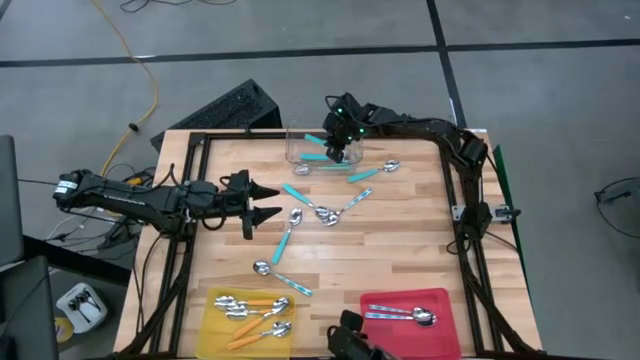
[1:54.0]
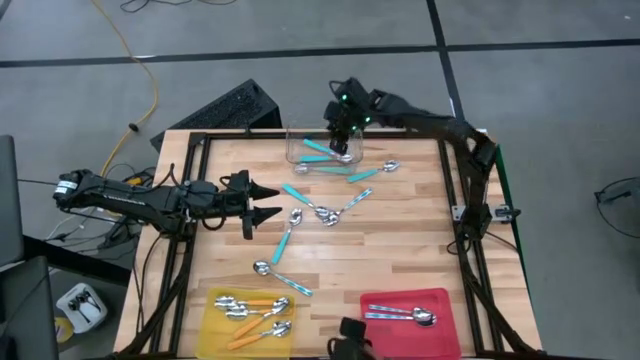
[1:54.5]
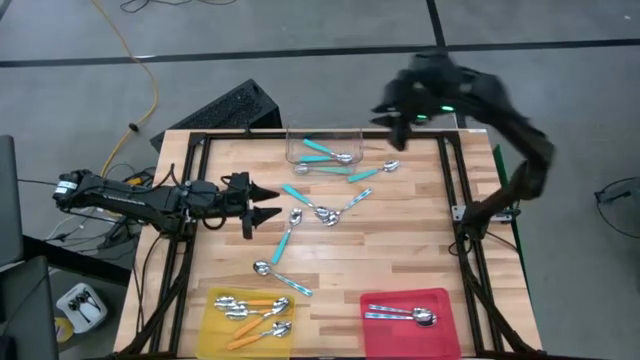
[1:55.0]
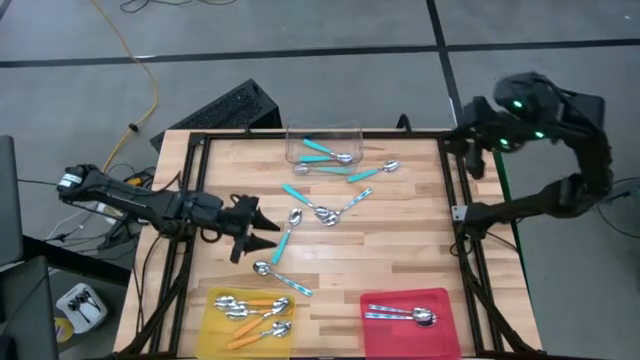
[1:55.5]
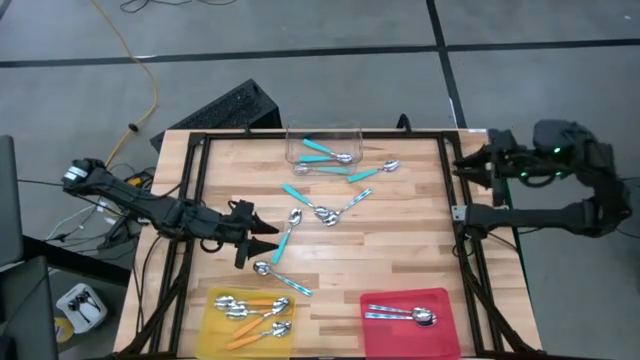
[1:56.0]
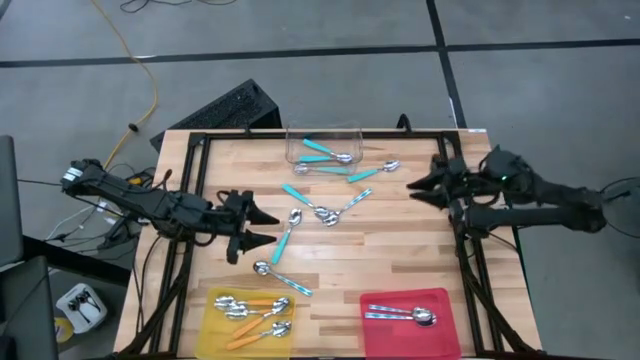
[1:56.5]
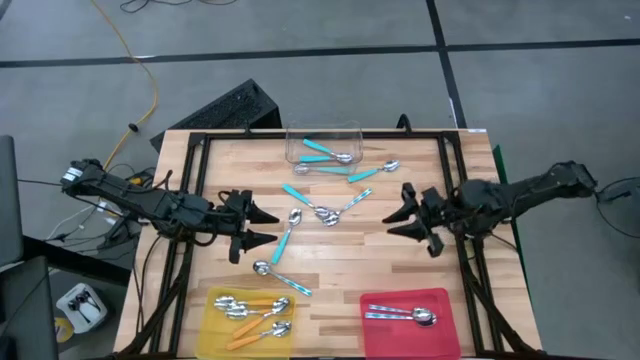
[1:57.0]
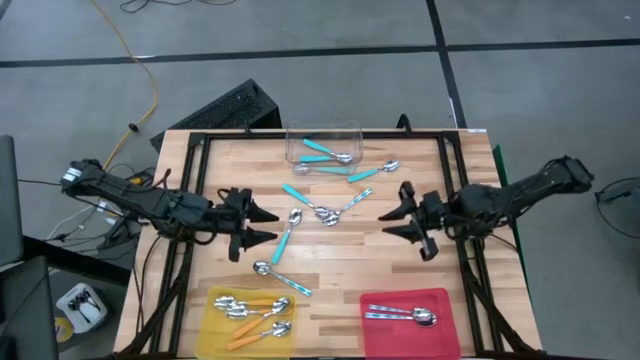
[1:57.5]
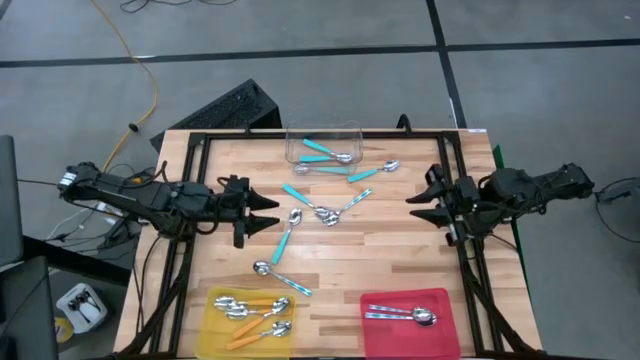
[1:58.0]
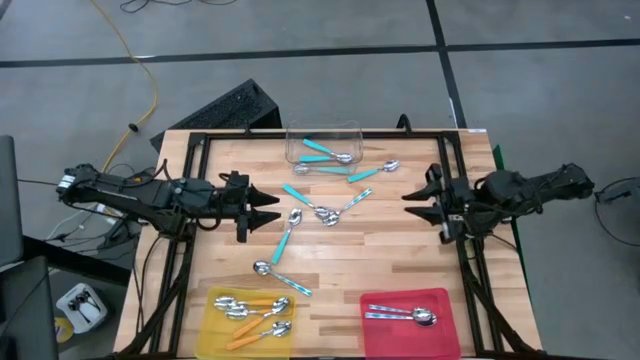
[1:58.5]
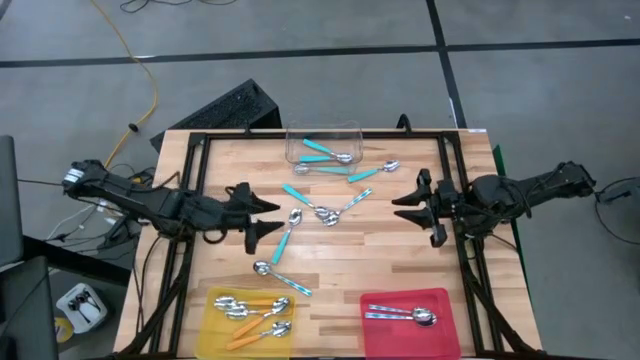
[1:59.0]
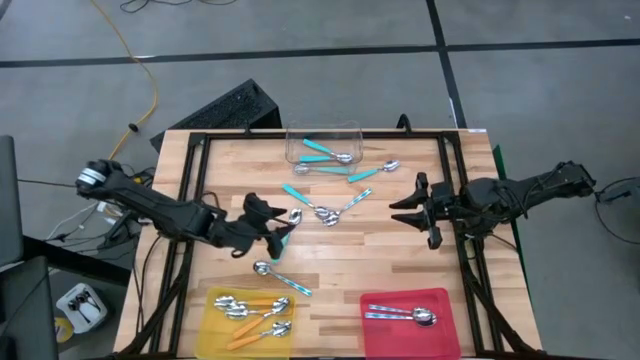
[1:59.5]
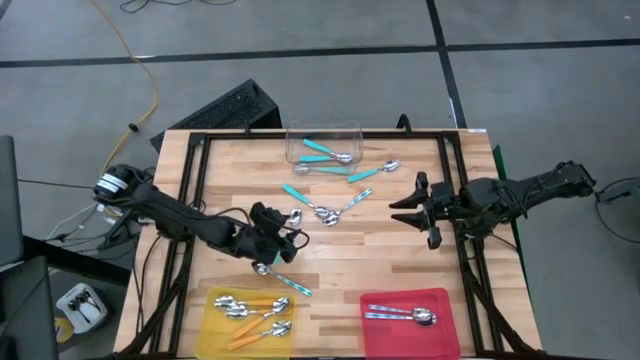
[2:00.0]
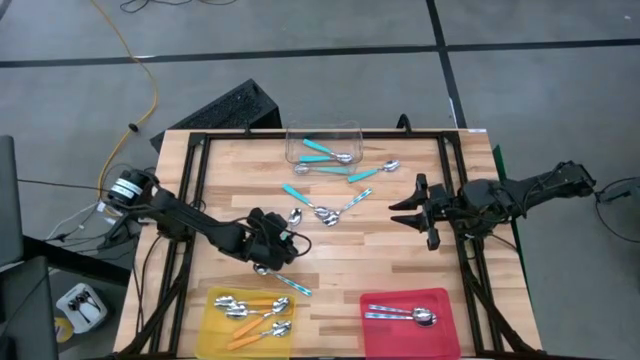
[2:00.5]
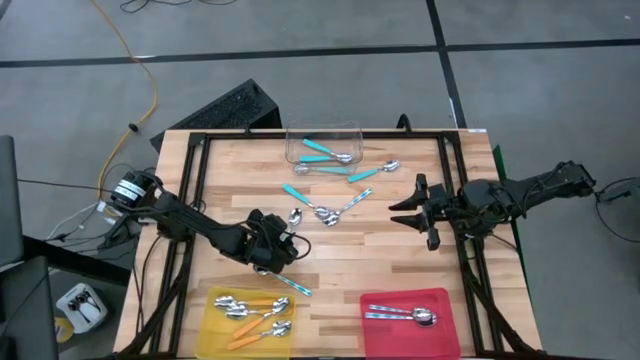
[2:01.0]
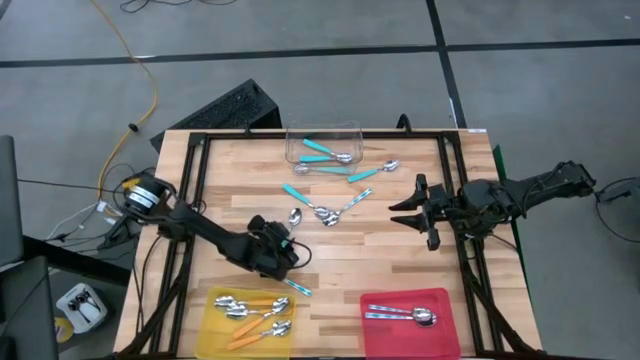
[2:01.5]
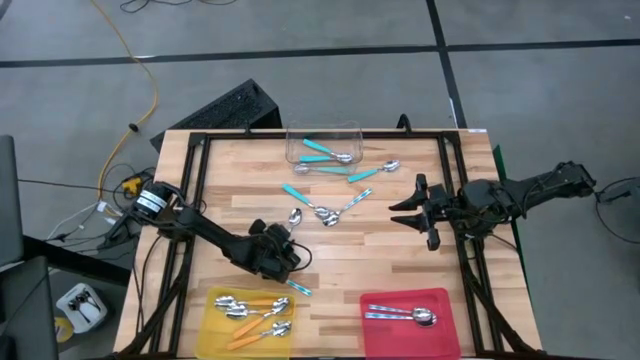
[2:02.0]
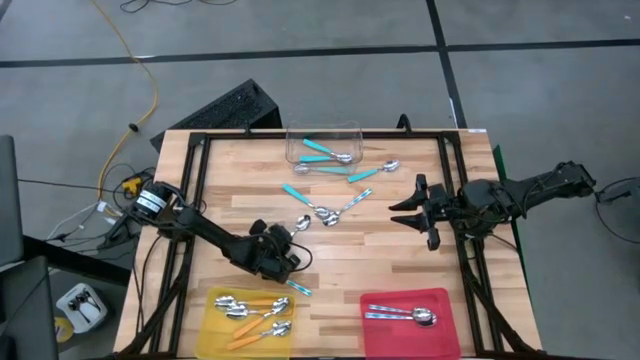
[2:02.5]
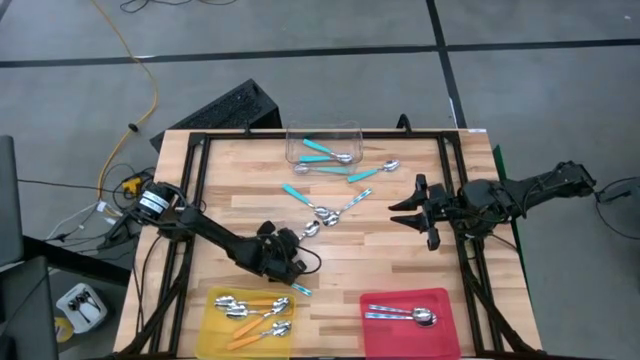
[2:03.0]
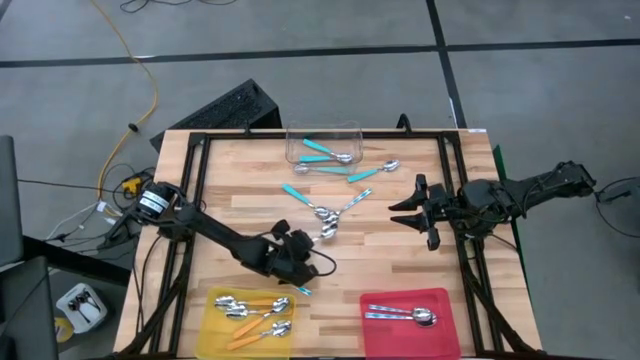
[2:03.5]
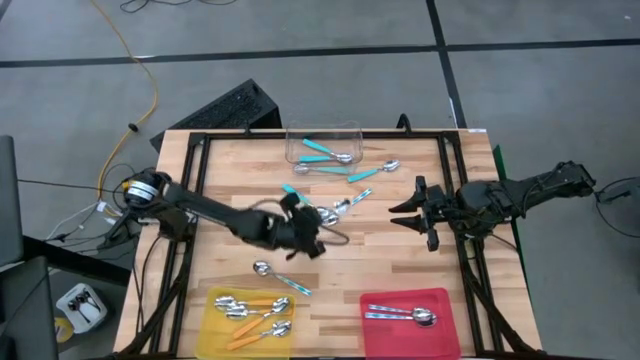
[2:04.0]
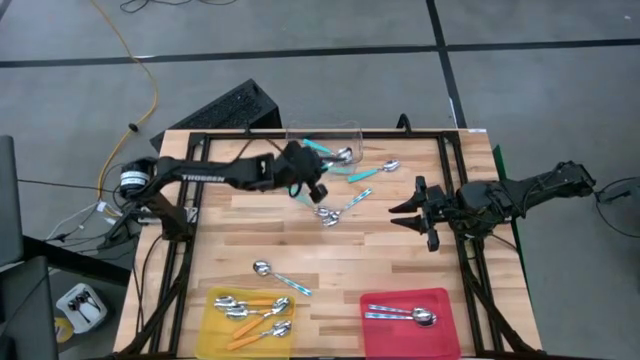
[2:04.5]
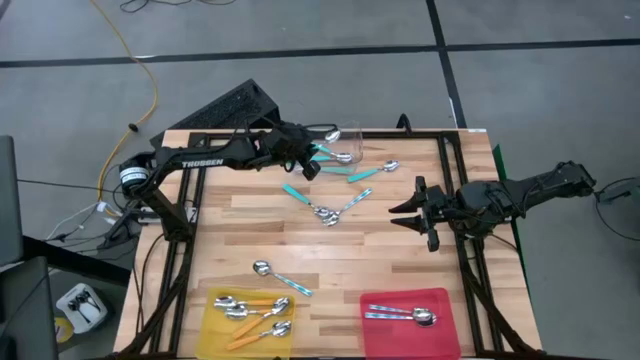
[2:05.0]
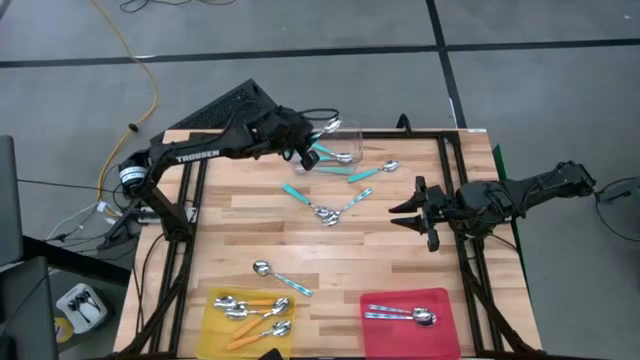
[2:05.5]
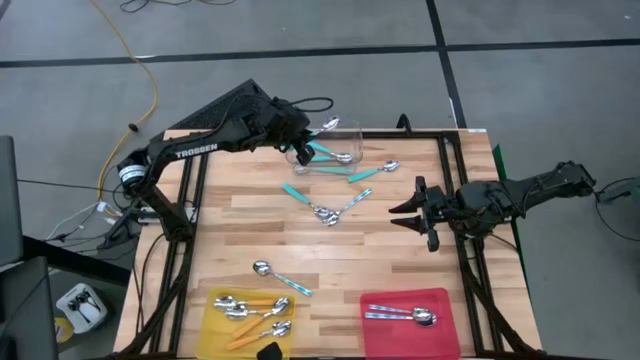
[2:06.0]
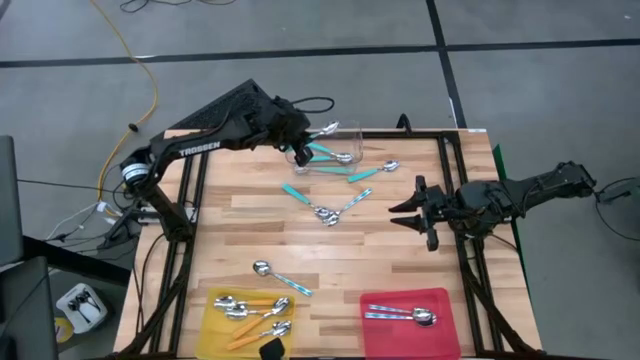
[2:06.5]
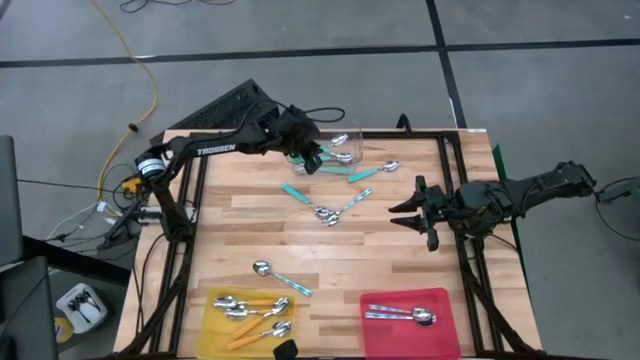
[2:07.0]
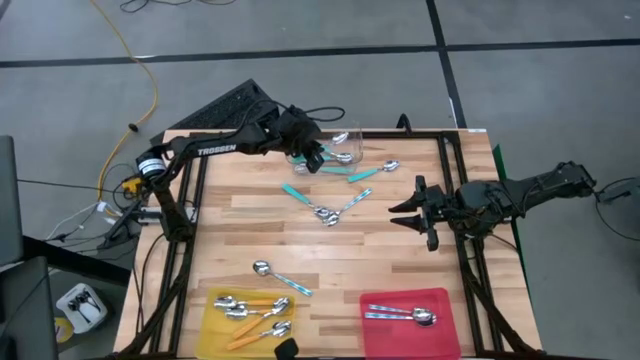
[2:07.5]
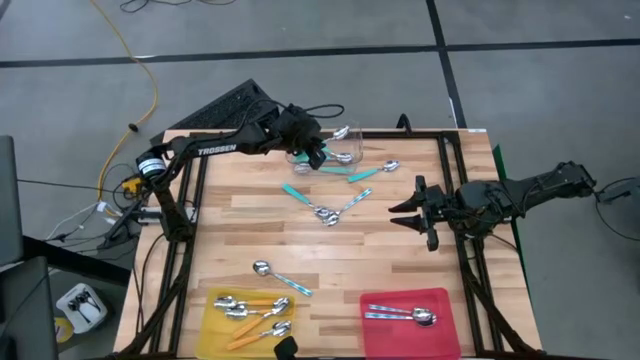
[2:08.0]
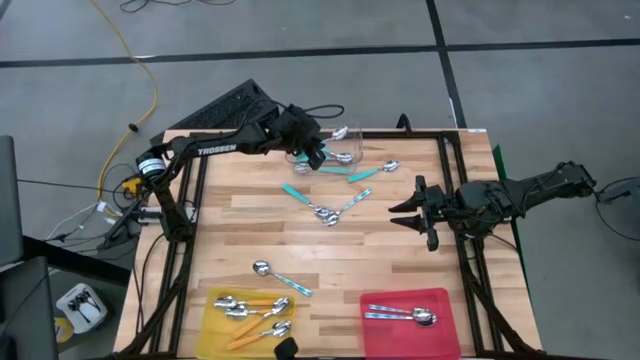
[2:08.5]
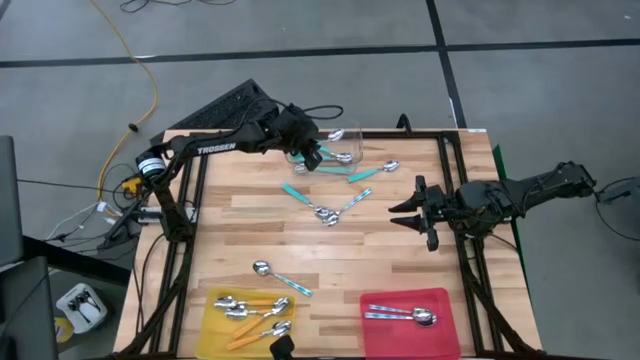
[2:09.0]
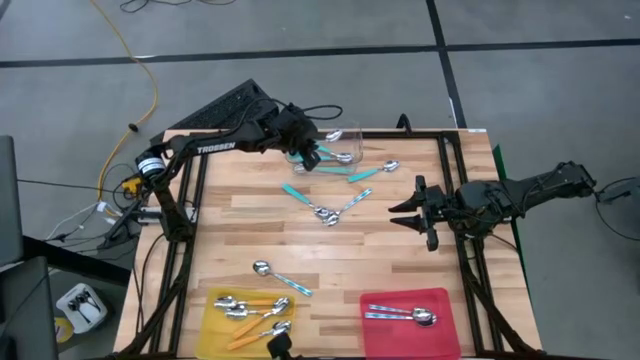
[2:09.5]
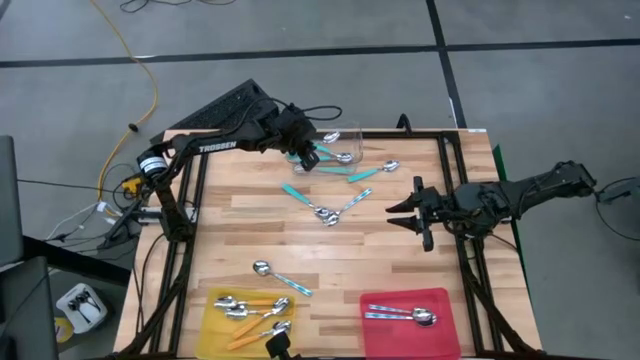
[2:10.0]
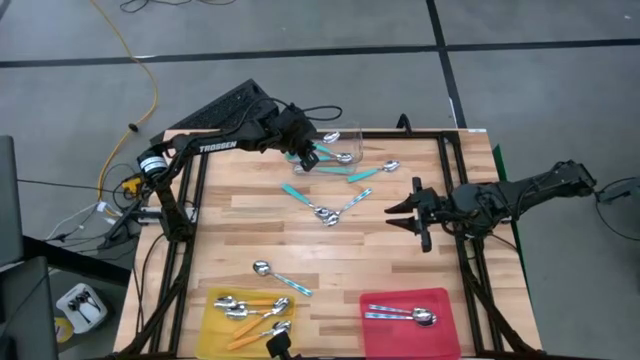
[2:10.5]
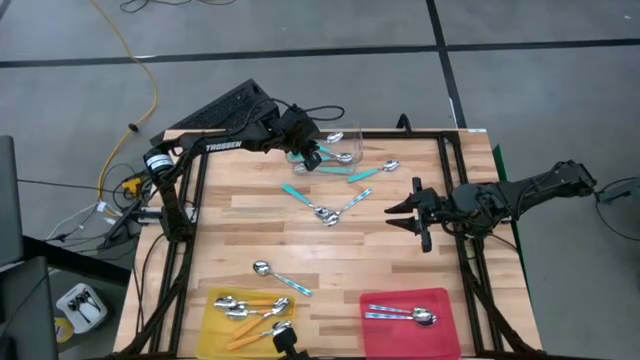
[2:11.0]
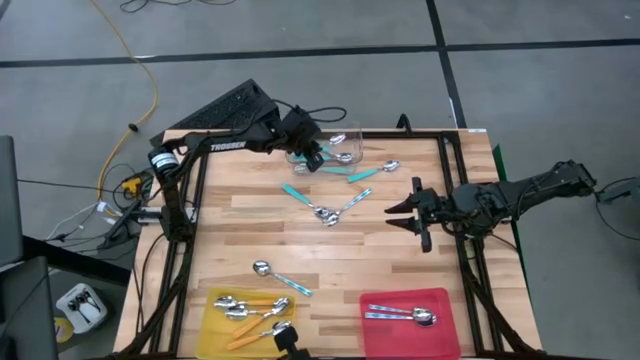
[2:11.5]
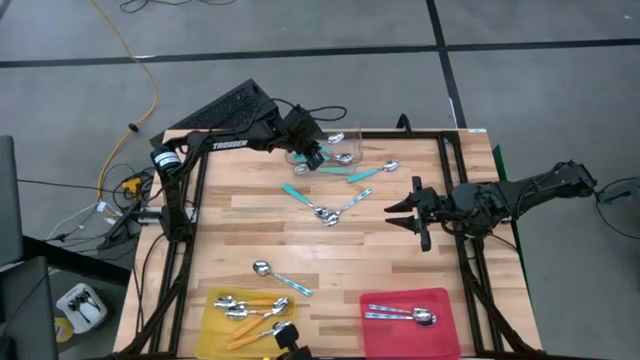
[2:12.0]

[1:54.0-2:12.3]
Task: Sort silverware by color (type)
Put the blue spoon into the transparent bin
